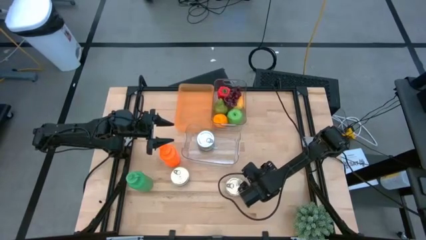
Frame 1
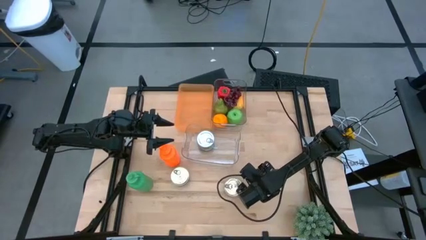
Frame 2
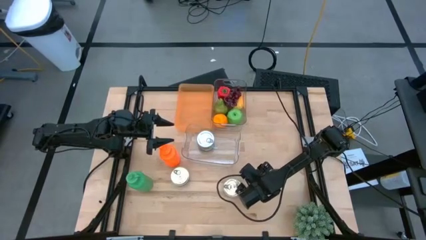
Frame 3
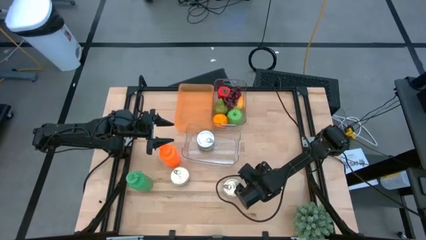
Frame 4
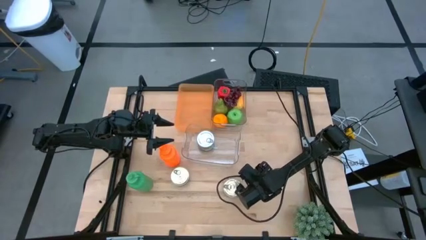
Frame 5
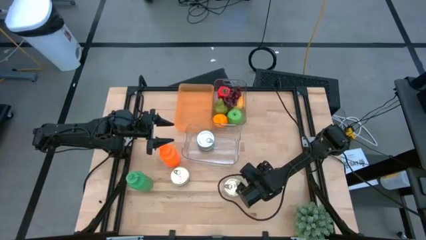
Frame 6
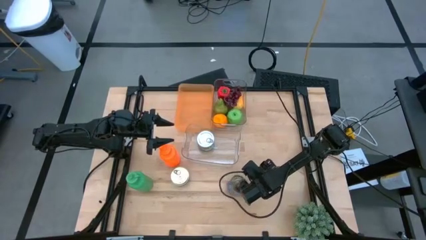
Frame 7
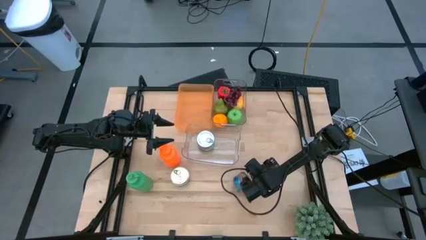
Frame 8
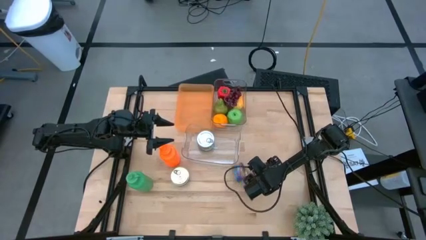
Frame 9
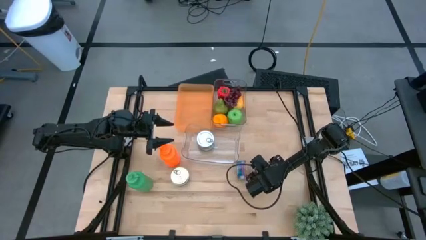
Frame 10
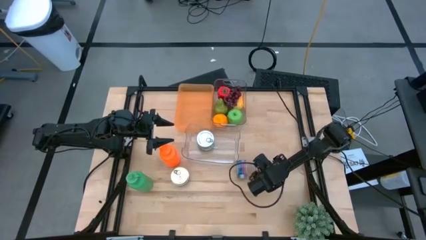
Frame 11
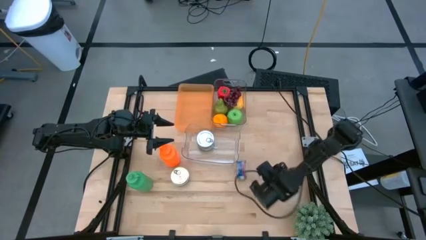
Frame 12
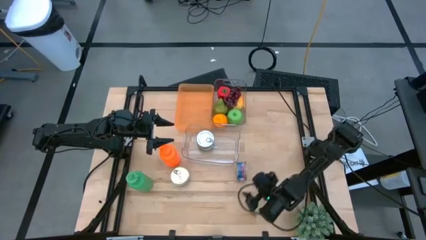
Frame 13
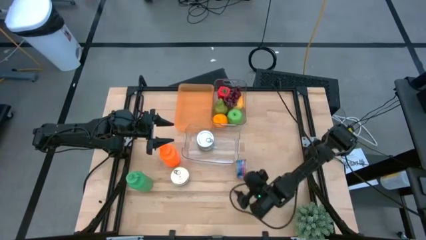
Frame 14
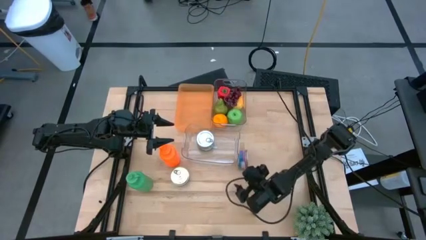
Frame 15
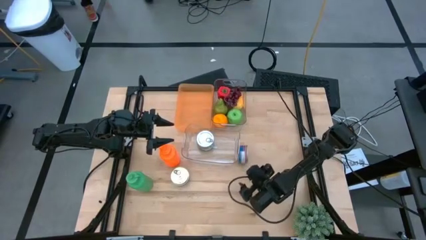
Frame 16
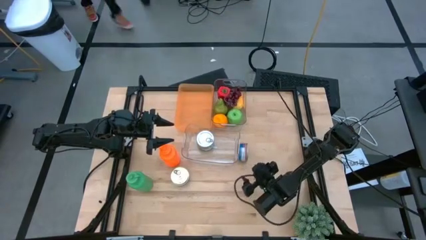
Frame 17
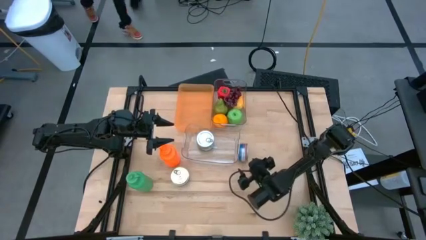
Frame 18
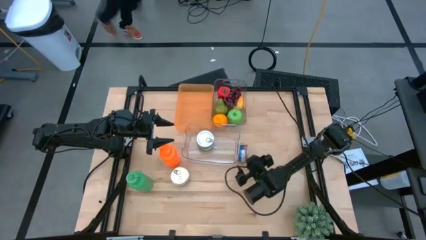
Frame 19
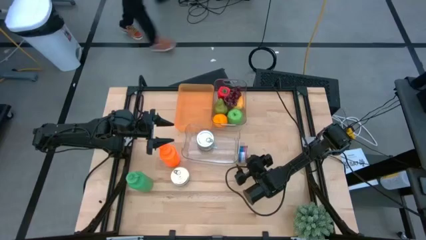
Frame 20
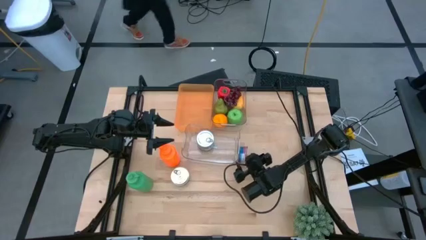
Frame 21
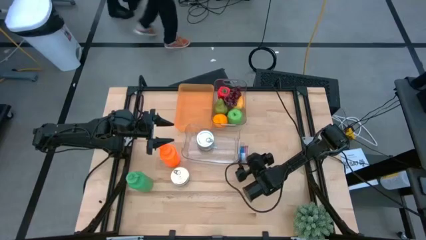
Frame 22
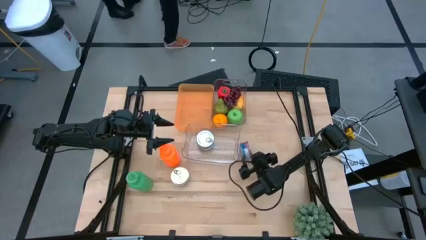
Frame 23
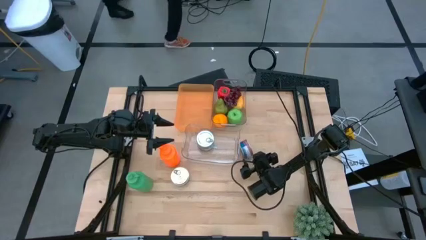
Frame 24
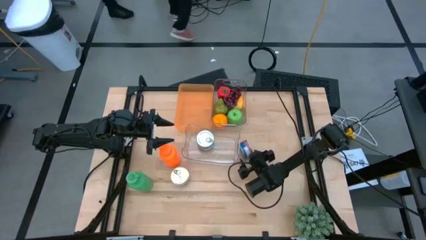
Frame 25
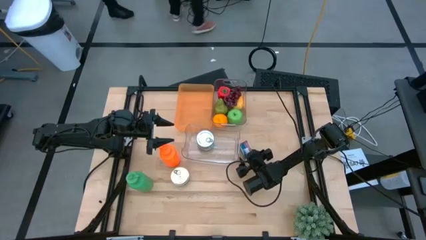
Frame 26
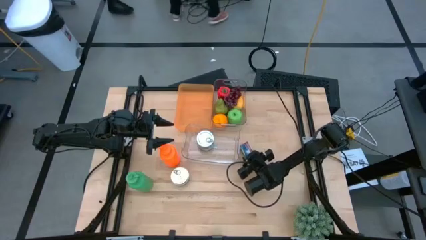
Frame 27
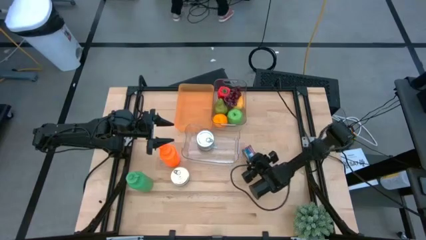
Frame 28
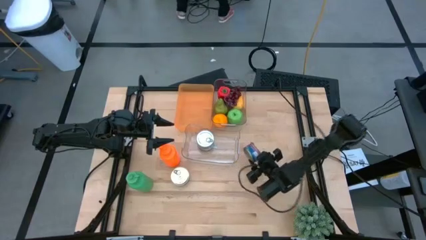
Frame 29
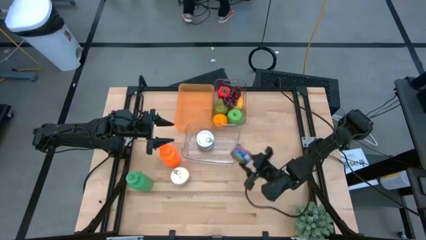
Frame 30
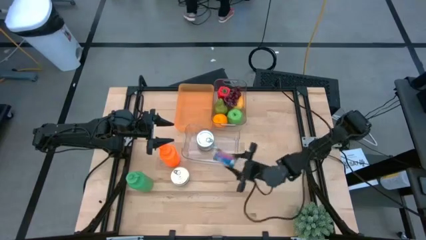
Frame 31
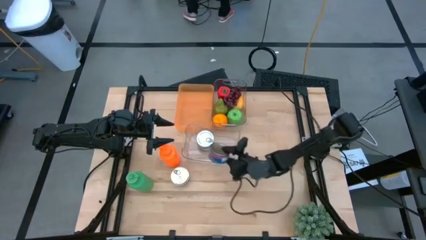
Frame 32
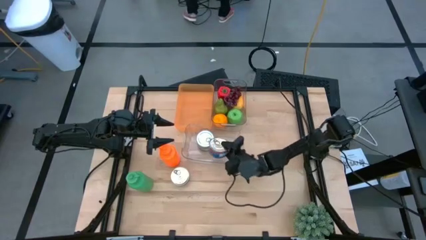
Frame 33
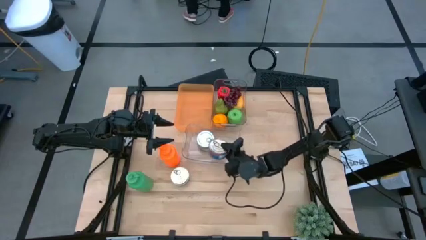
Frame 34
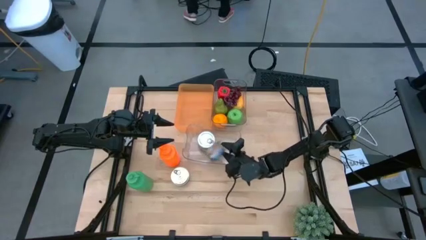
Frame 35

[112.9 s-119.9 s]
Task: Pick & Place Food Item
Put the bottom blue pink tuna can into the bottom transparent bin

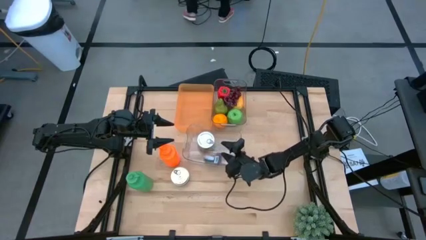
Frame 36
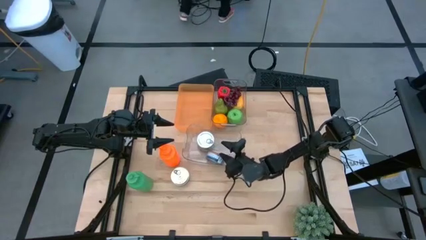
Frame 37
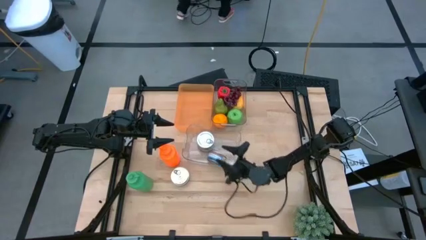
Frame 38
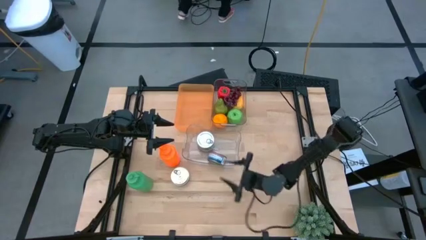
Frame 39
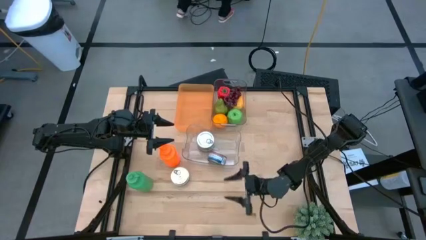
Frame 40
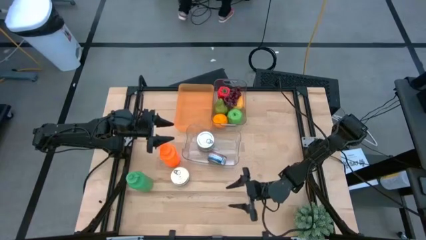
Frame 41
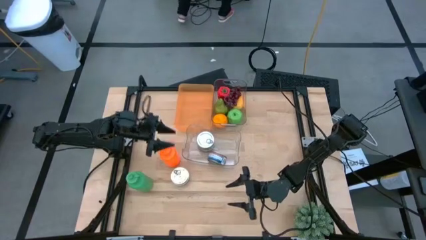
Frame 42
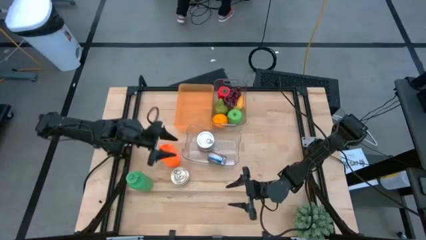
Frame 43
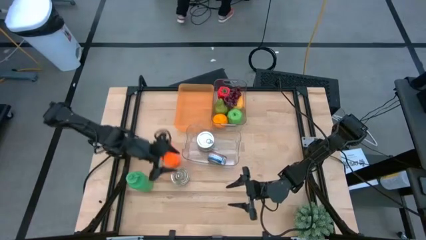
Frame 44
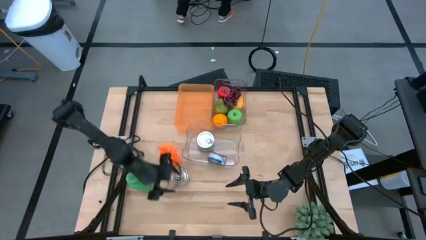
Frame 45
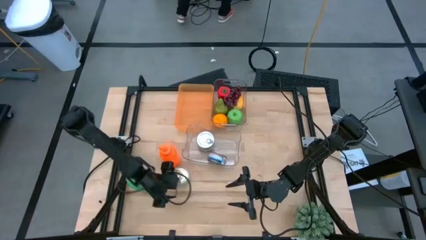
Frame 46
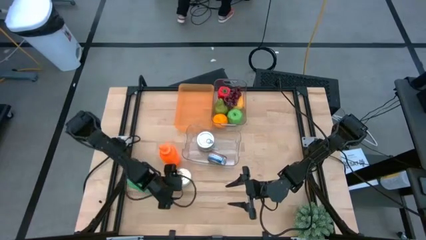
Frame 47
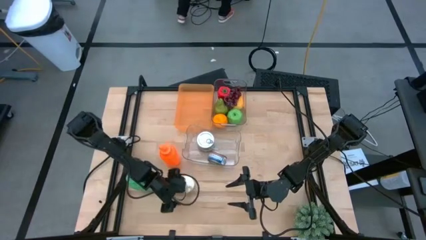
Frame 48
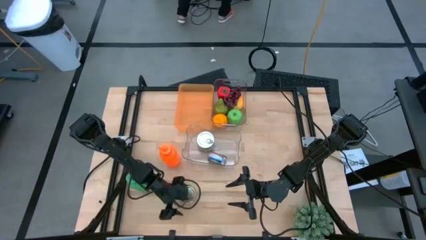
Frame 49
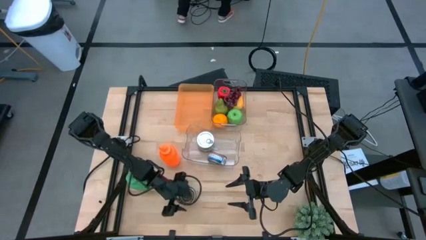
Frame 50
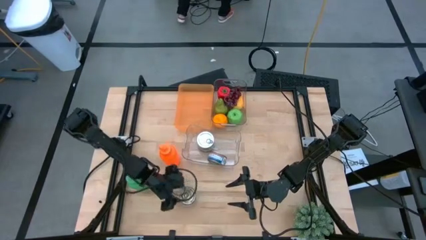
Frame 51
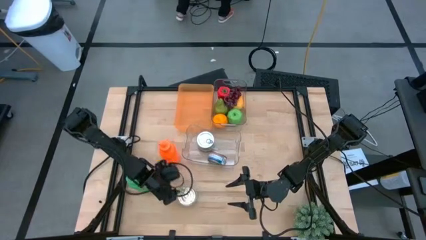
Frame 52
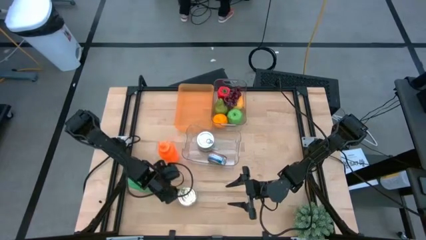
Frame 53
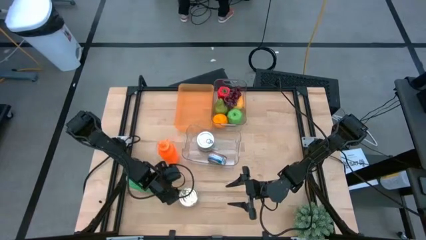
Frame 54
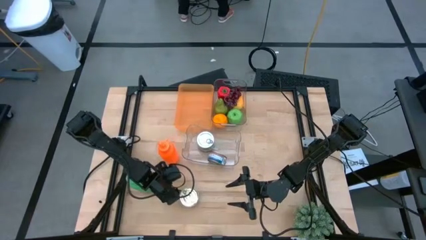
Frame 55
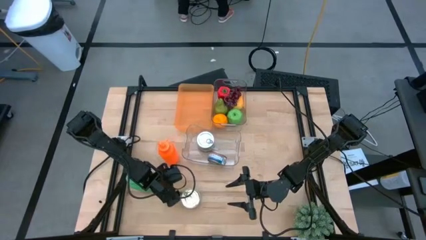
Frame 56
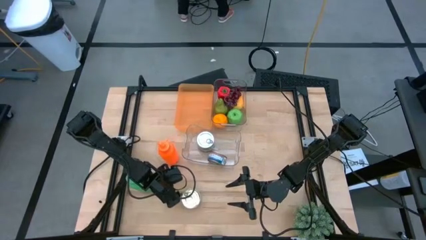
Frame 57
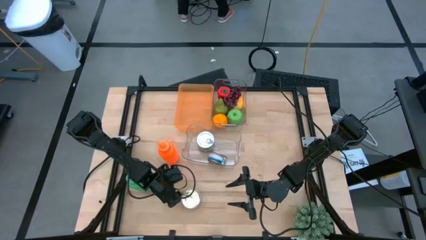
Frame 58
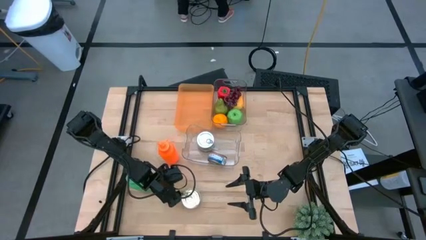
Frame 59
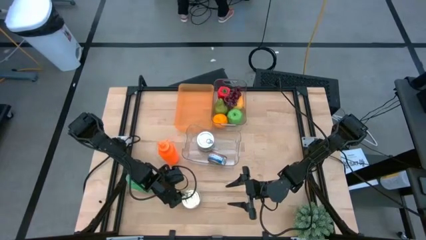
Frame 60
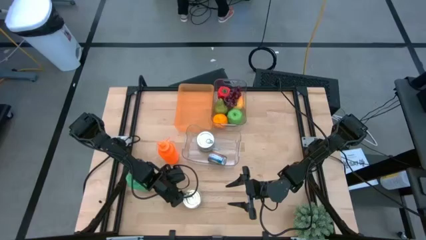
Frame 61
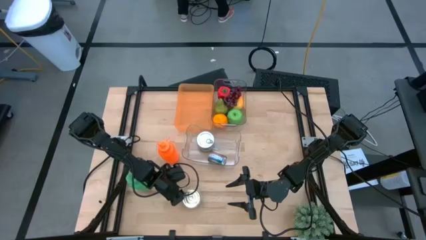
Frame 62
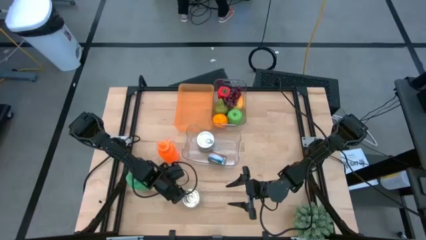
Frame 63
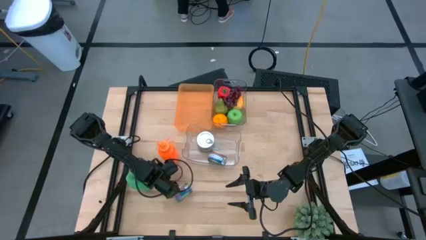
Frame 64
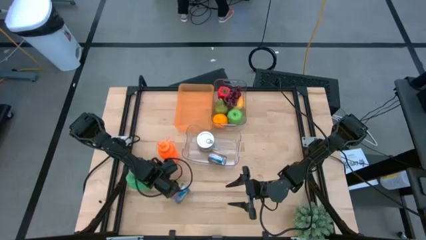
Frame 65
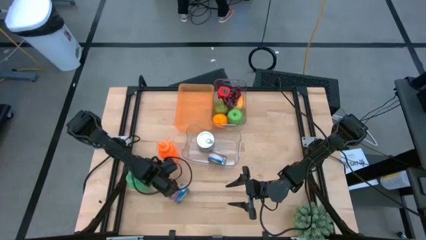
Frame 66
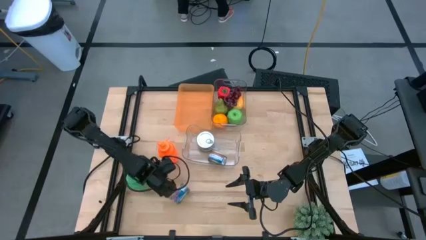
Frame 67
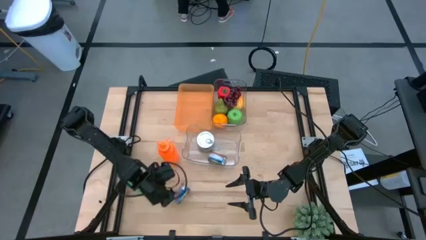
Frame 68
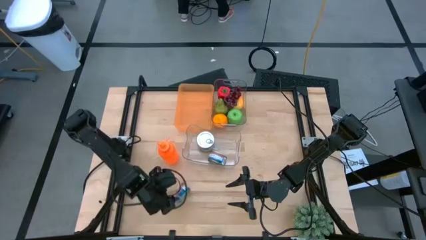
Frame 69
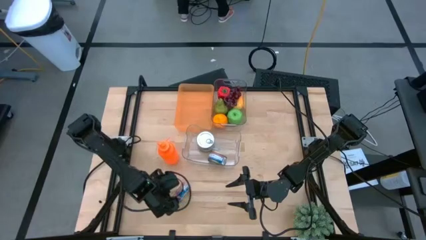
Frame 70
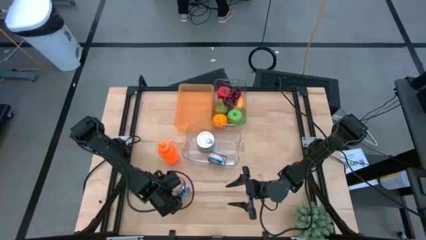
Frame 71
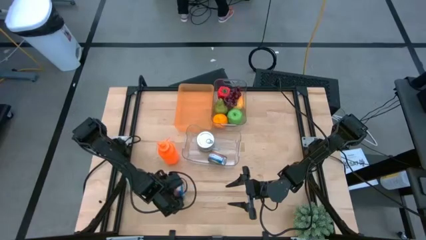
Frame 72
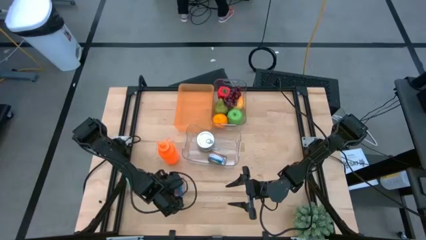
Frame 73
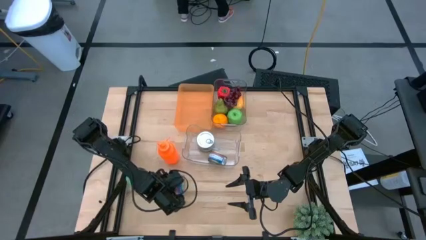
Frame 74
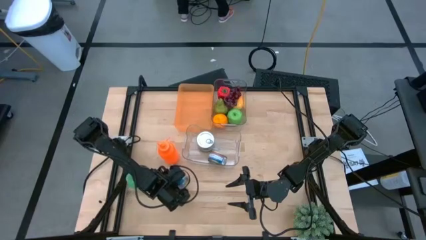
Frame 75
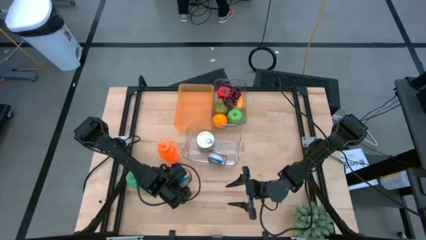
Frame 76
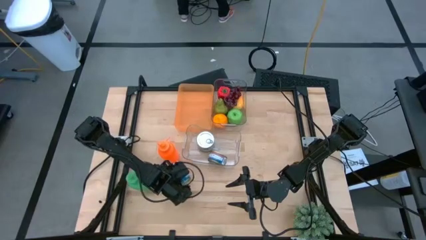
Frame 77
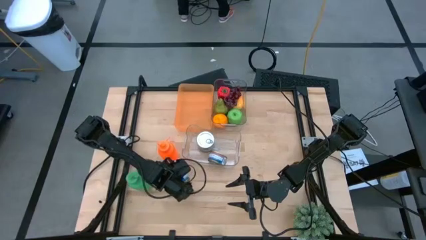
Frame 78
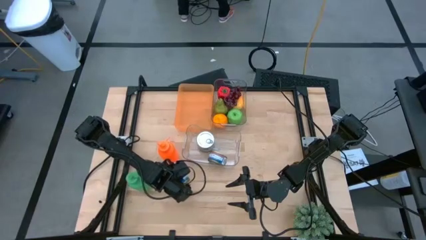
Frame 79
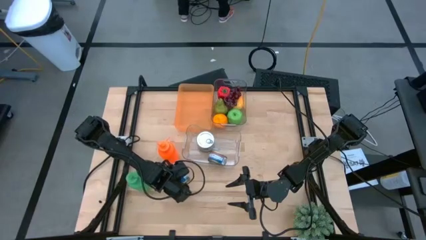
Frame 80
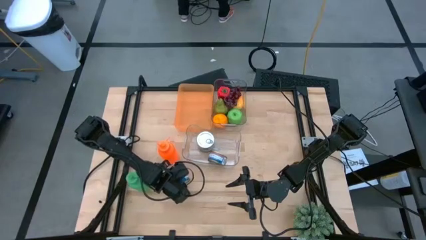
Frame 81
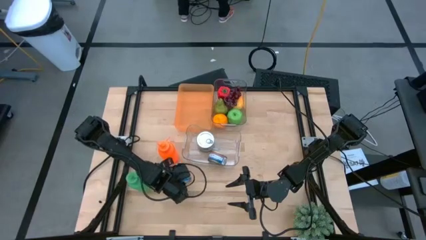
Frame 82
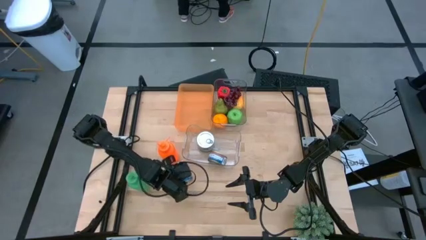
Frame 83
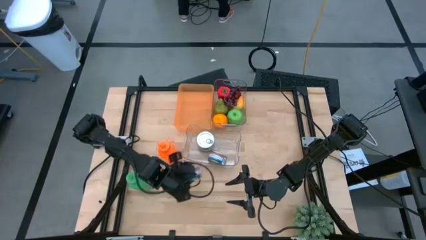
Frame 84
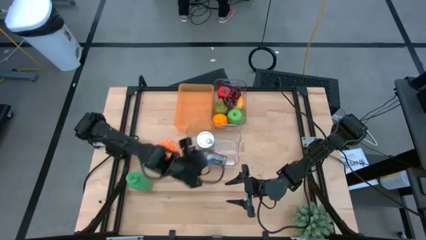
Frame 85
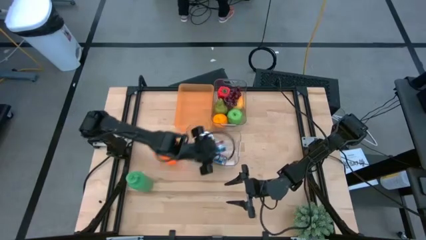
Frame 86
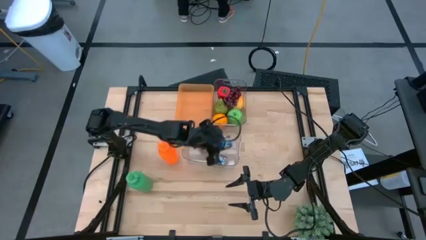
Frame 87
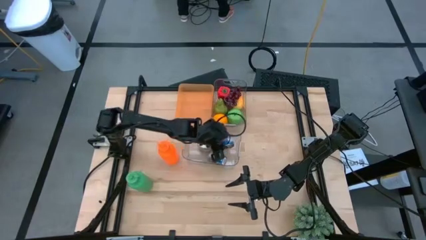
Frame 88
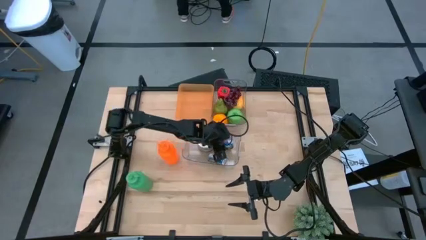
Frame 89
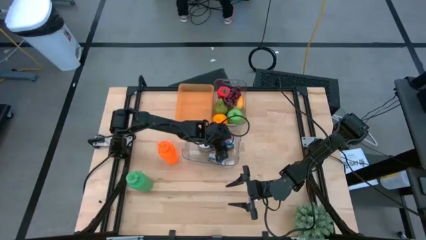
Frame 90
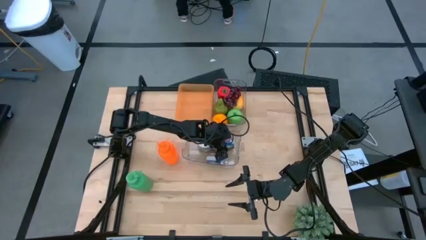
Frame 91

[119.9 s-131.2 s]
Put the blue tuna can into the bottom transparent bin
